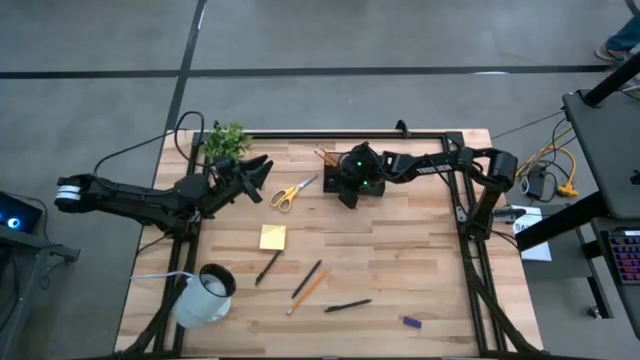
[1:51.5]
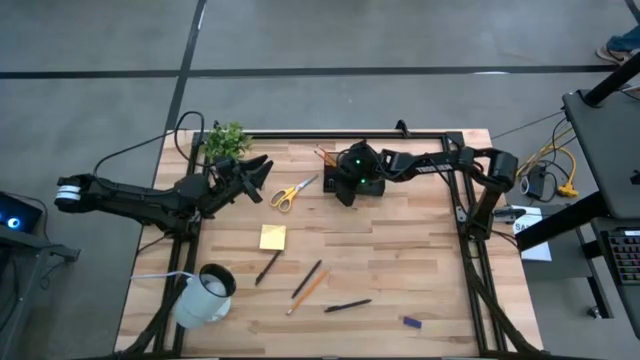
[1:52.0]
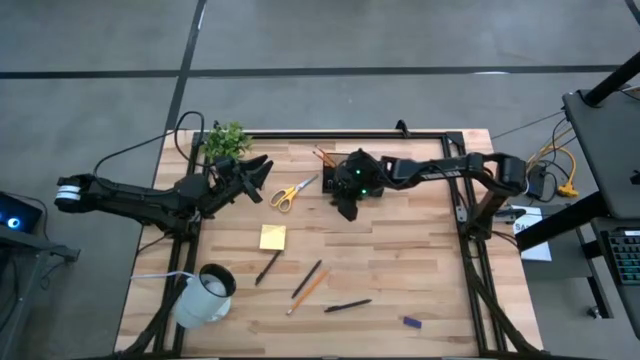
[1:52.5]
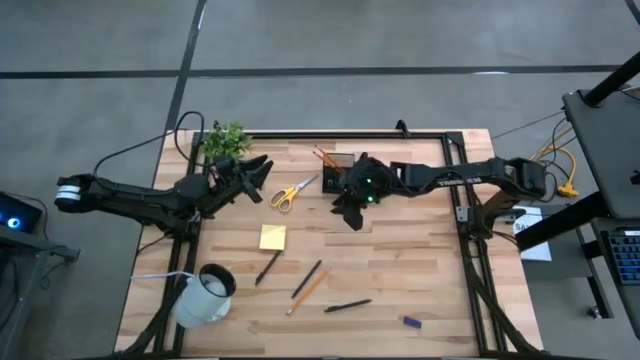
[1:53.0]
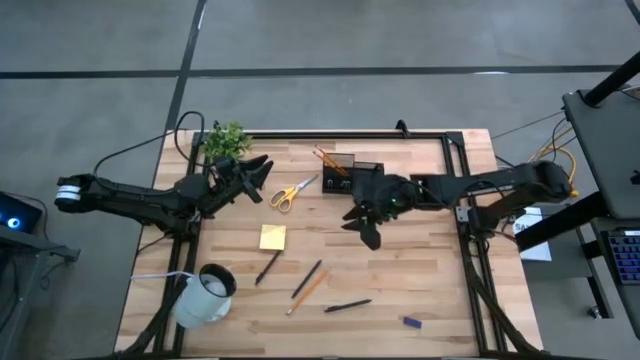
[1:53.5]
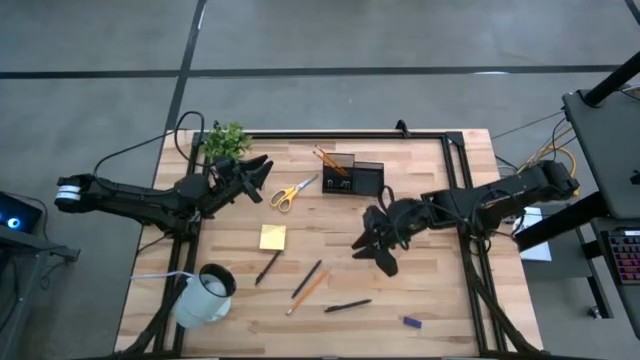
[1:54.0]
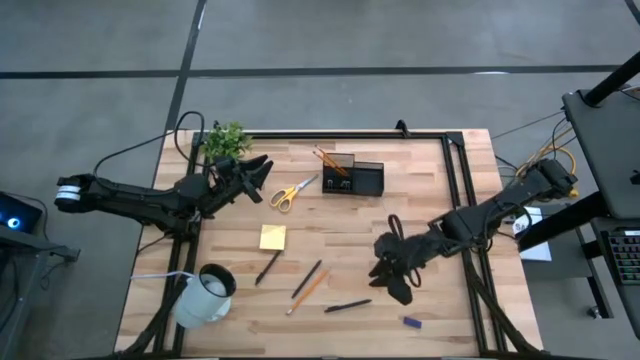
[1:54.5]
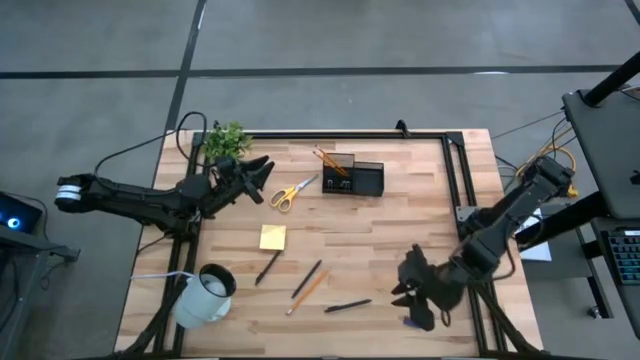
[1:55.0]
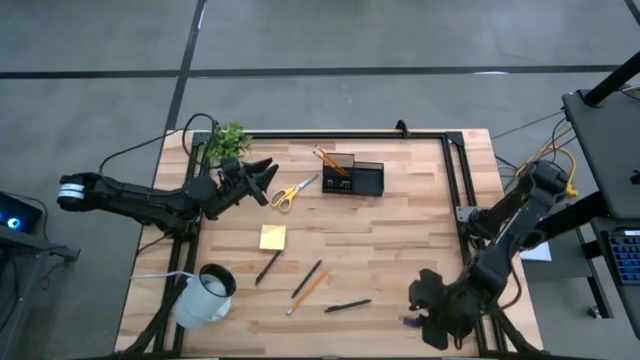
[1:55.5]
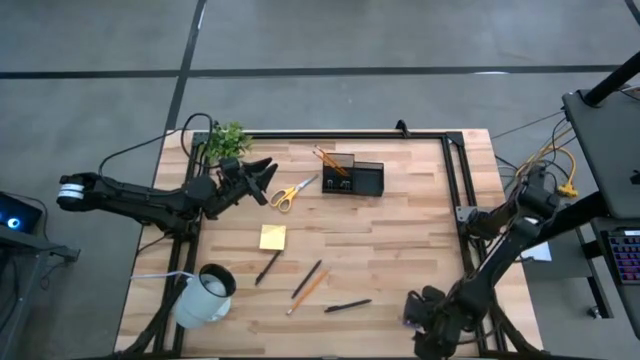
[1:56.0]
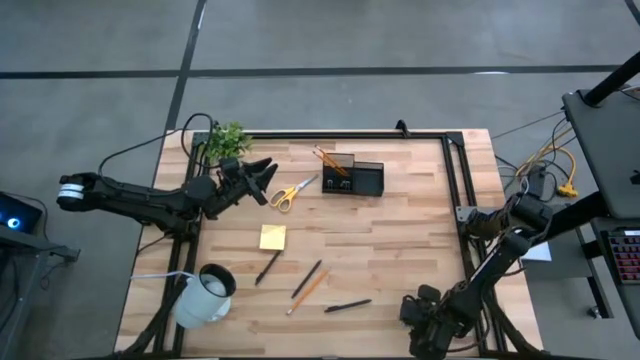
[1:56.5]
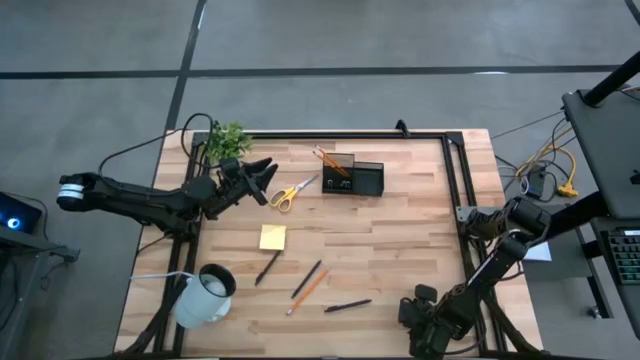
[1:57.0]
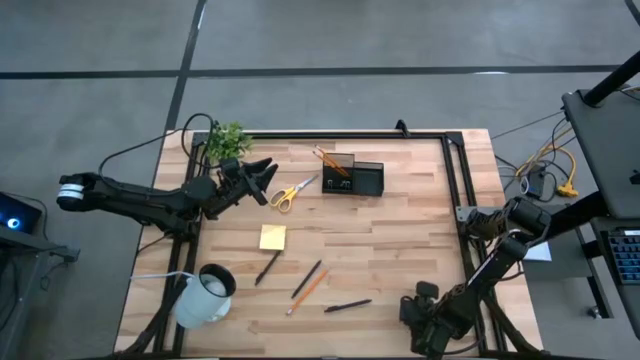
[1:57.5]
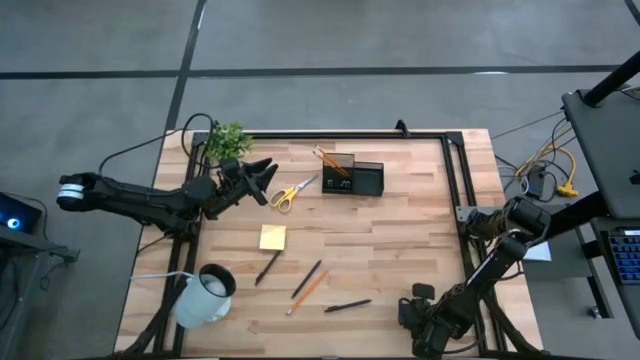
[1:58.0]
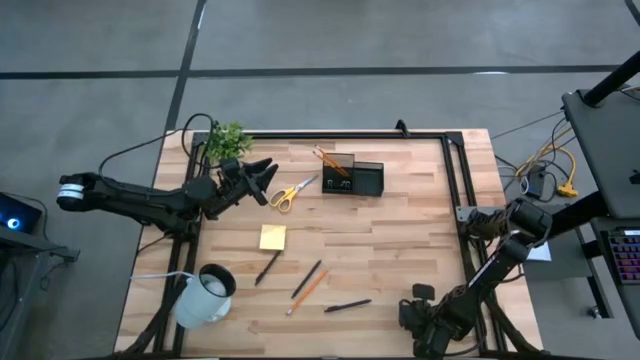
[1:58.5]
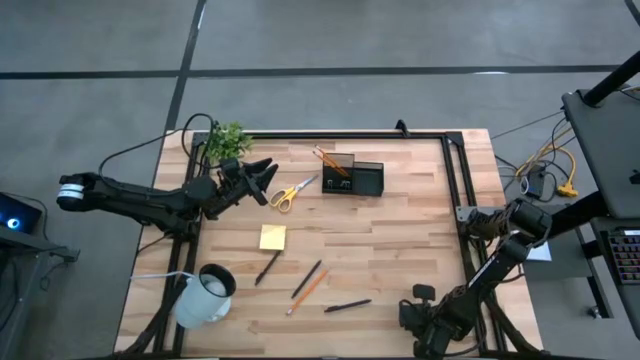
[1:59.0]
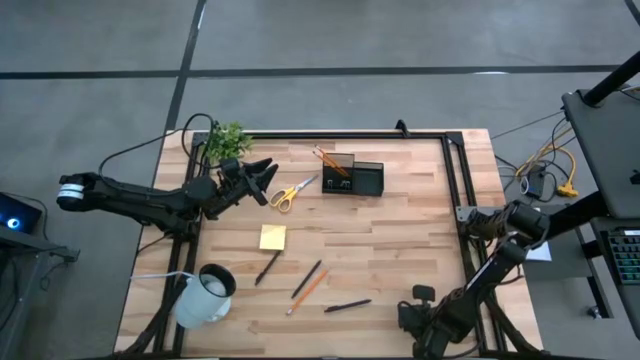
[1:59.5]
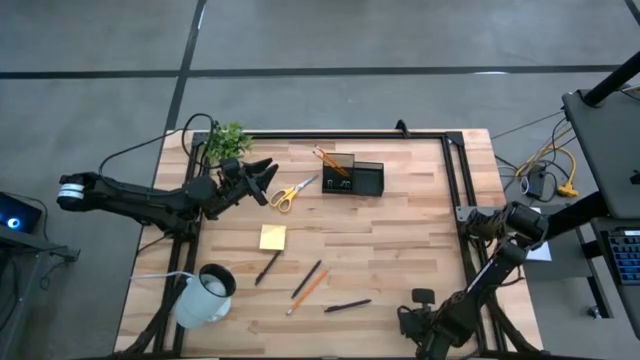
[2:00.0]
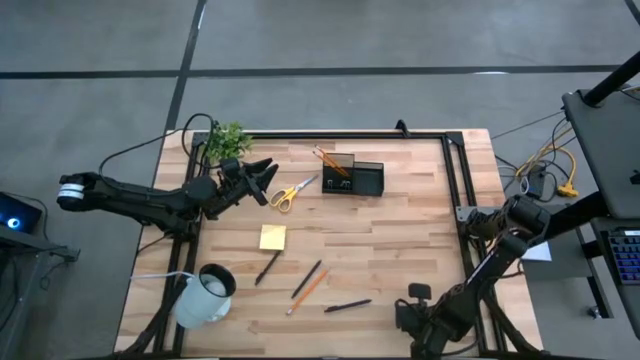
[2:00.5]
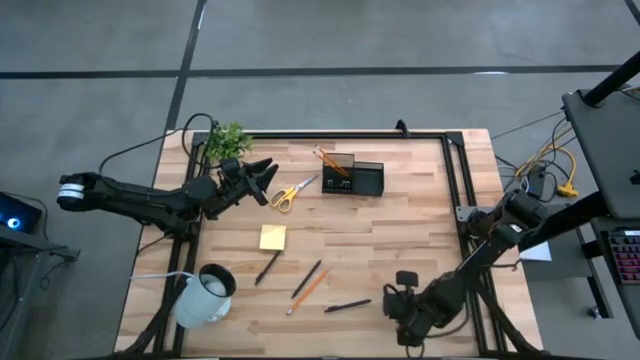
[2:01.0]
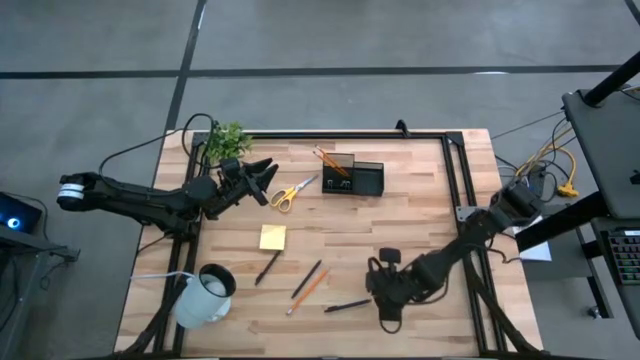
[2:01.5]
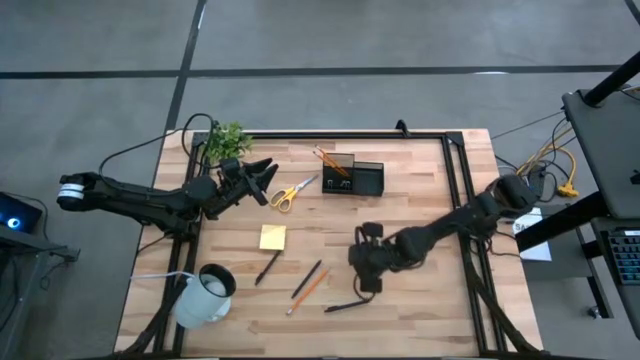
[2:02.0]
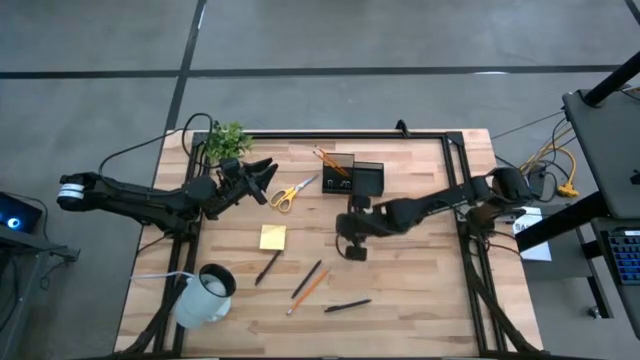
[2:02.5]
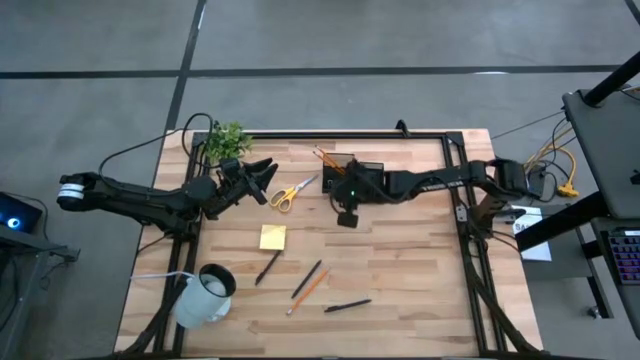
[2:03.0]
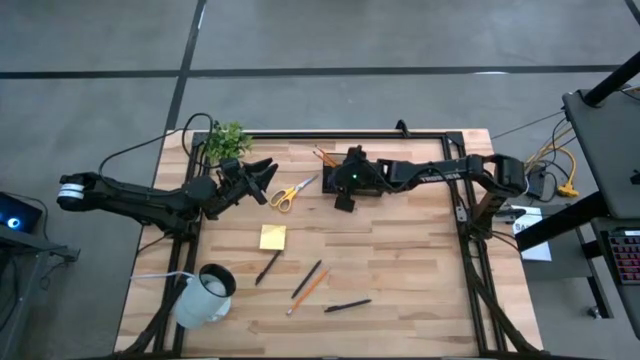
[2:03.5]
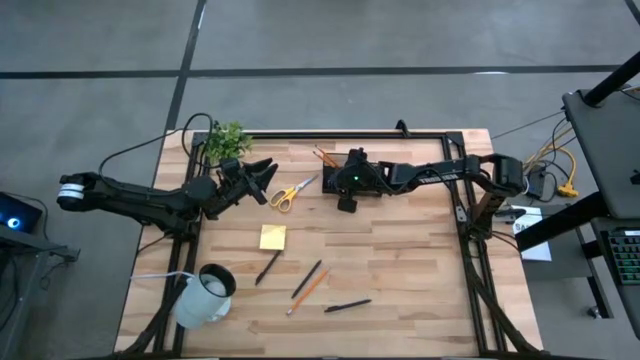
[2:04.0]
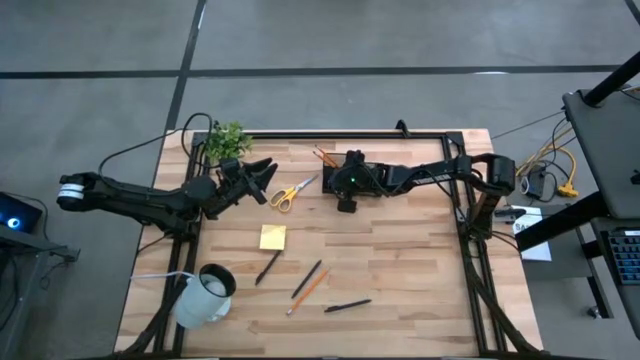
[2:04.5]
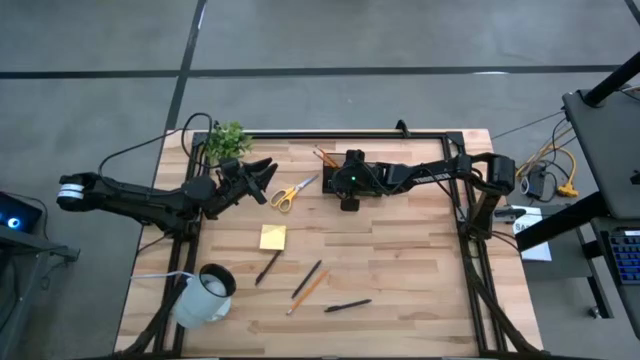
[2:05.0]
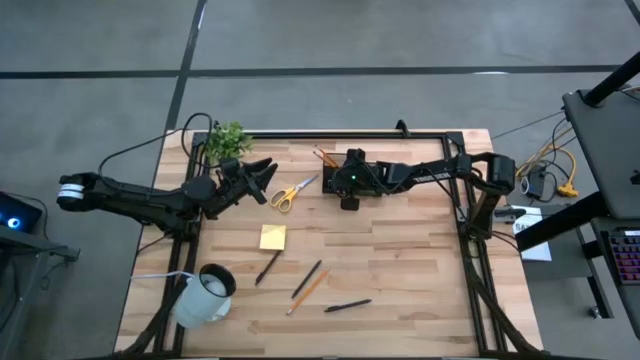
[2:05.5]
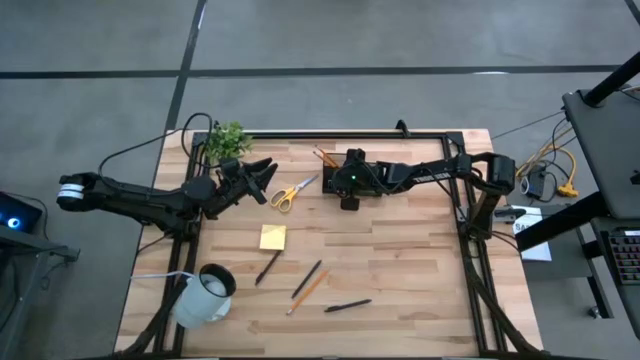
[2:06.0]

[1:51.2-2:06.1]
Task: Pick and place office supplies into organizer
Put the eraser into the desk organizer

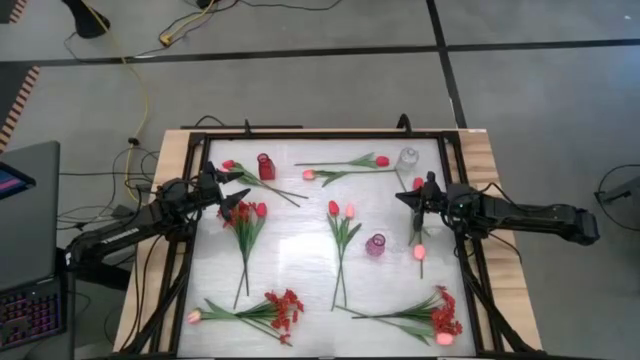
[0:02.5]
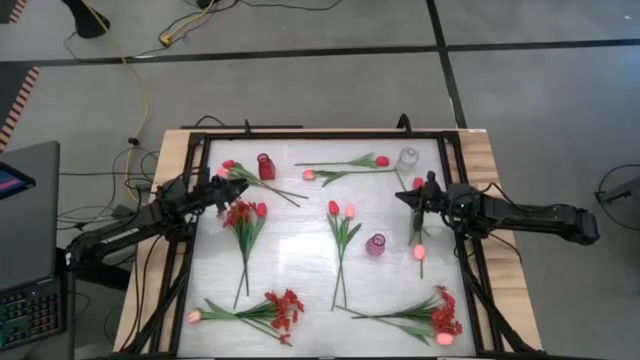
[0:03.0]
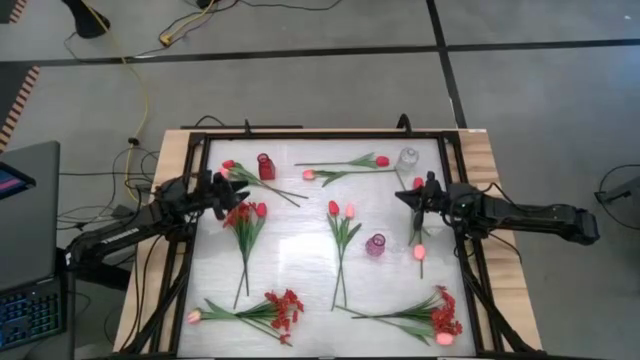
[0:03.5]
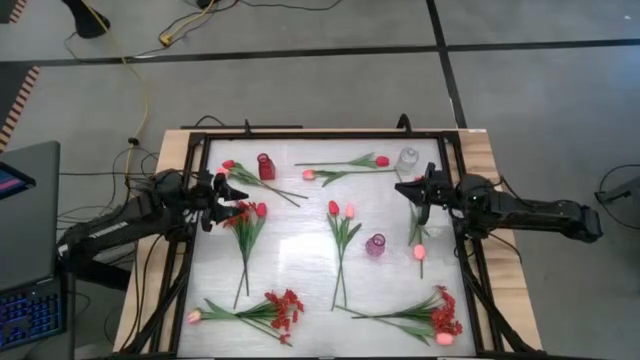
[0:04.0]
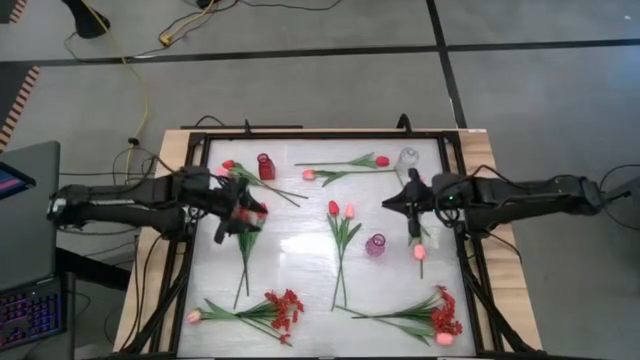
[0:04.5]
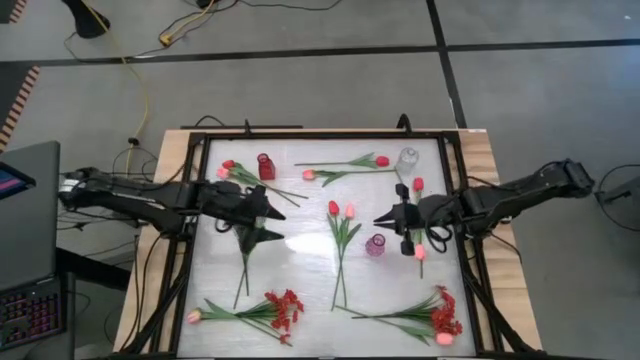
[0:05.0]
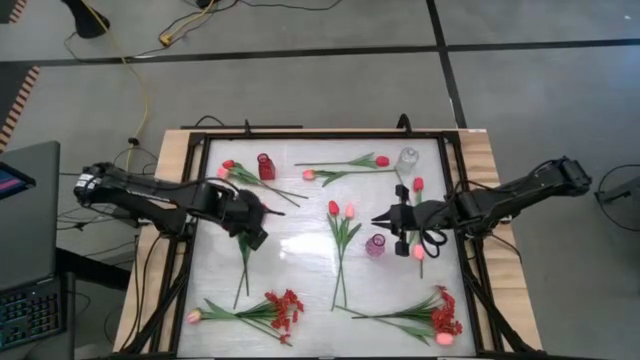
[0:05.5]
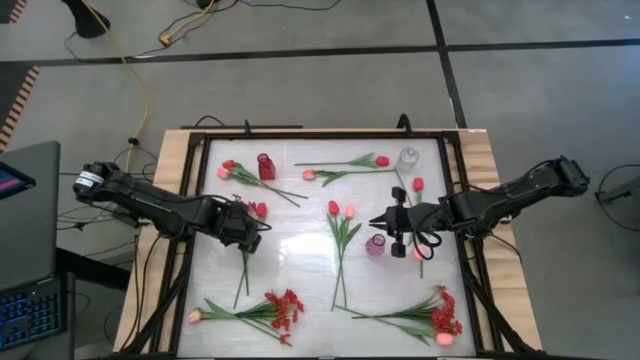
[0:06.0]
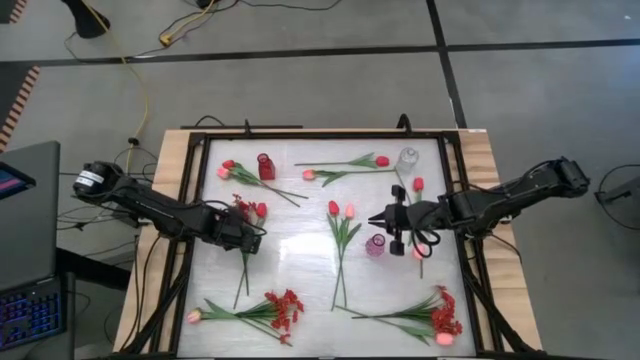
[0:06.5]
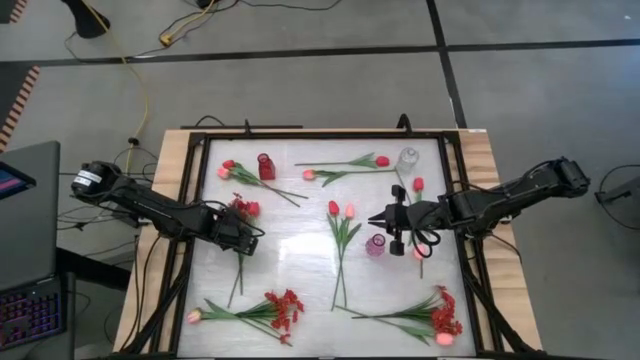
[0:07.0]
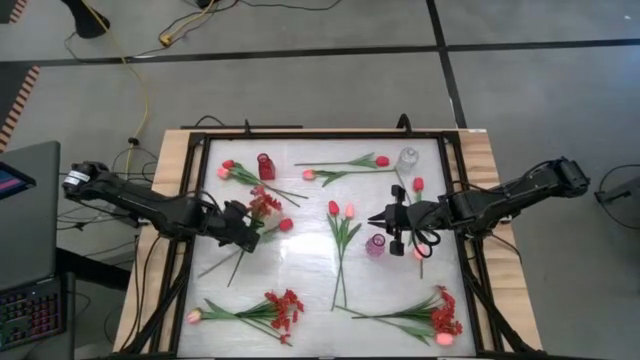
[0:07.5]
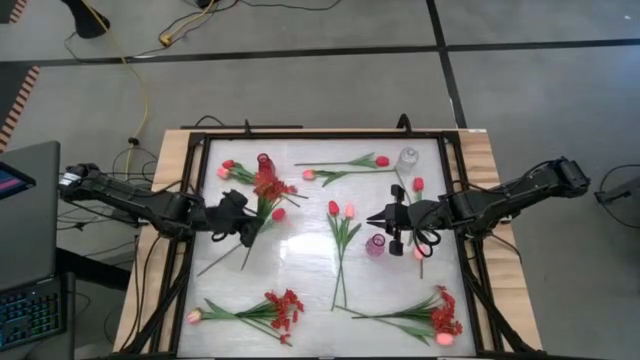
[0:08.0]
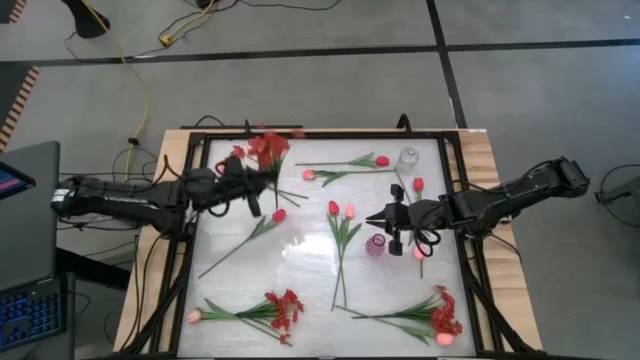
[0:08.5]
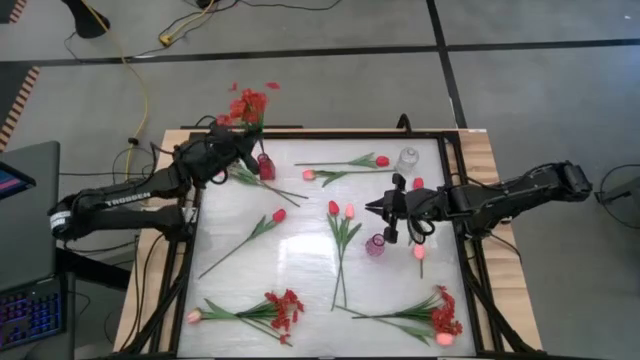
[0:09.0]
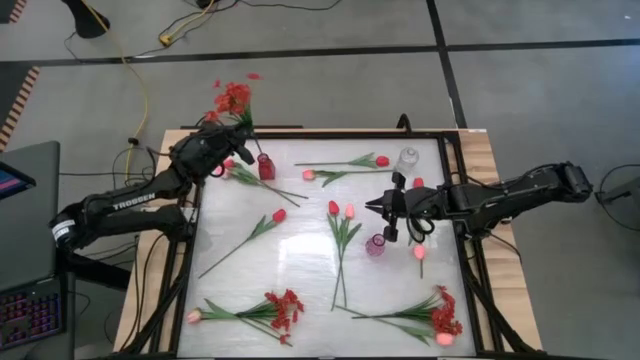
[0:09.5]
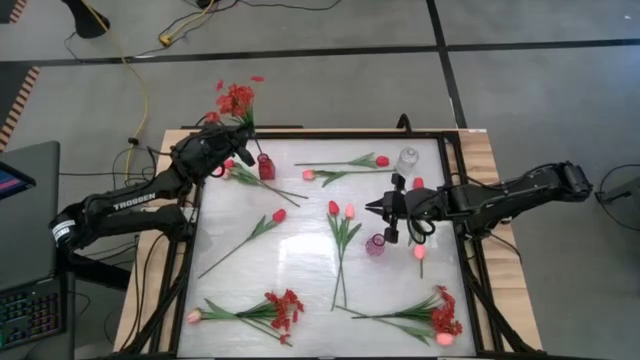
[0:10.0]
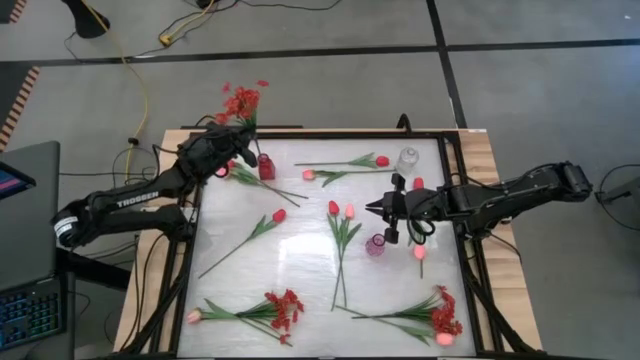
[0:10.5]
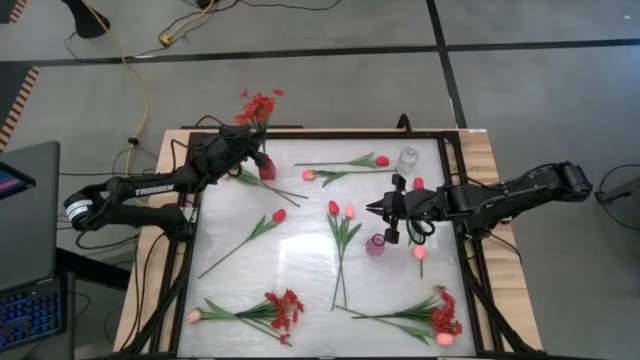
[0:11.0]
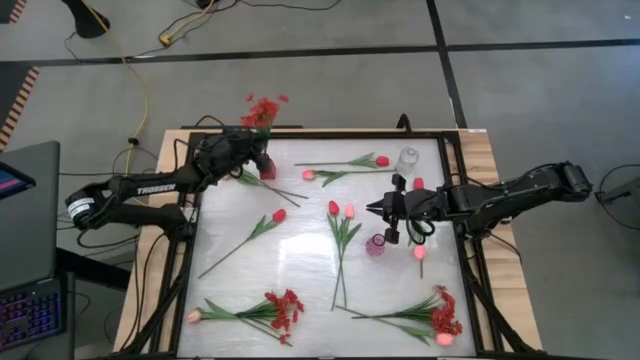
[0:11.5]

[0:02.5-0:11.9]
Task: Sort flowers into vase by color
Put the orange flowers into the red flower vase
